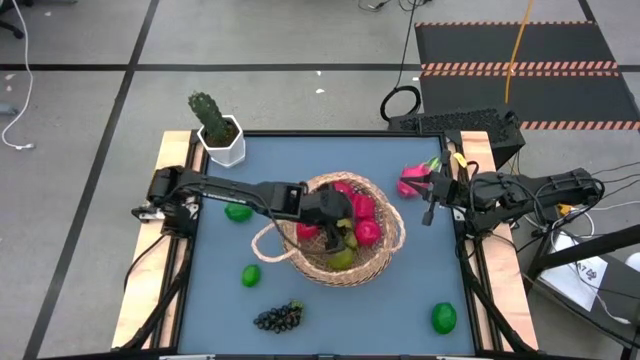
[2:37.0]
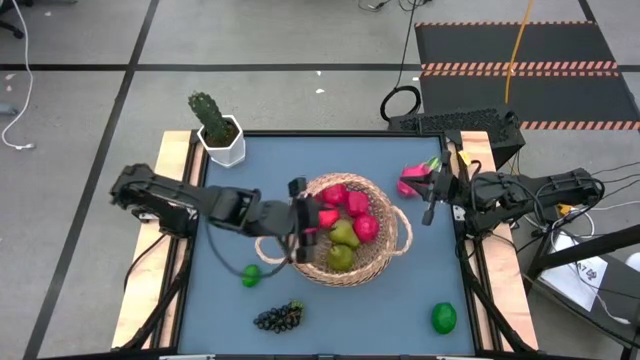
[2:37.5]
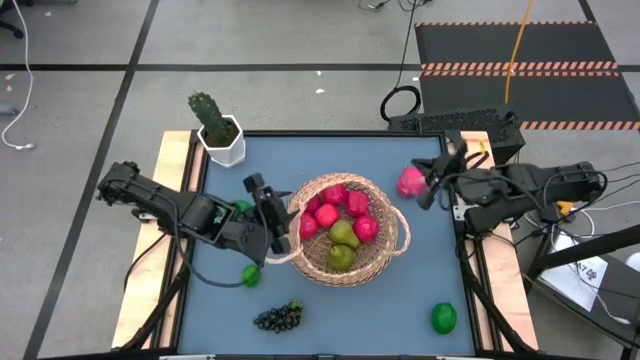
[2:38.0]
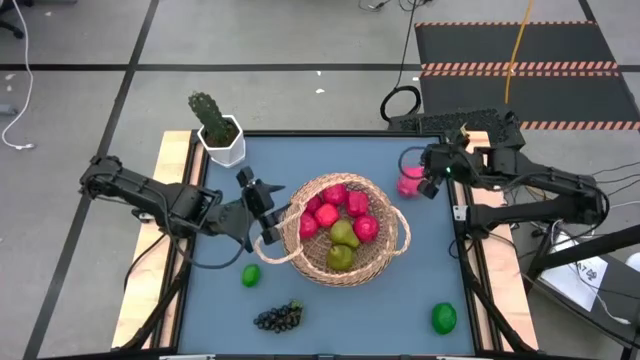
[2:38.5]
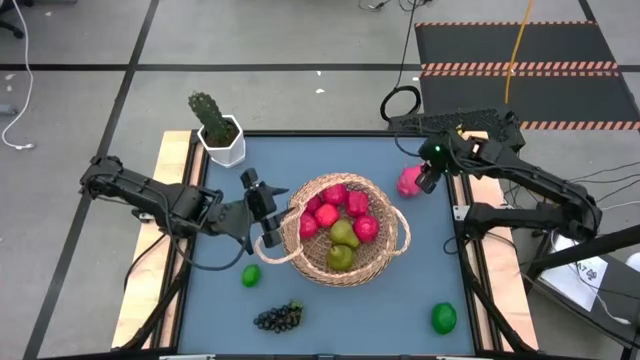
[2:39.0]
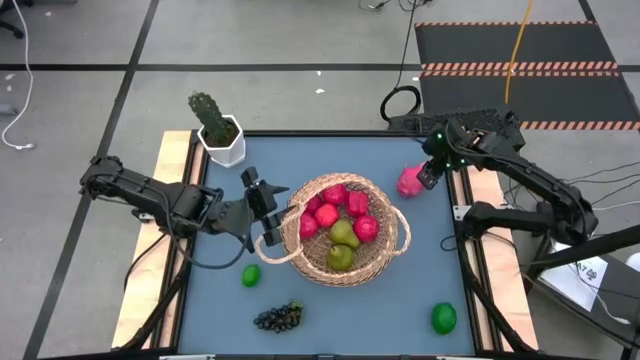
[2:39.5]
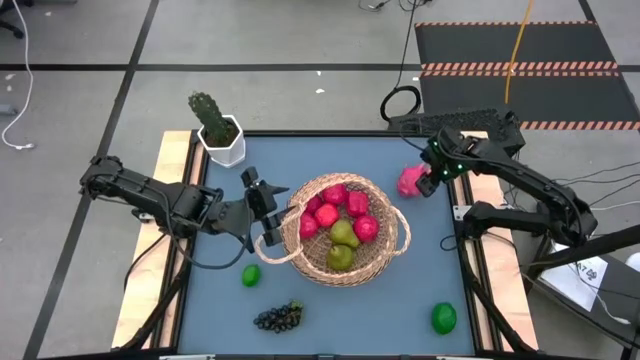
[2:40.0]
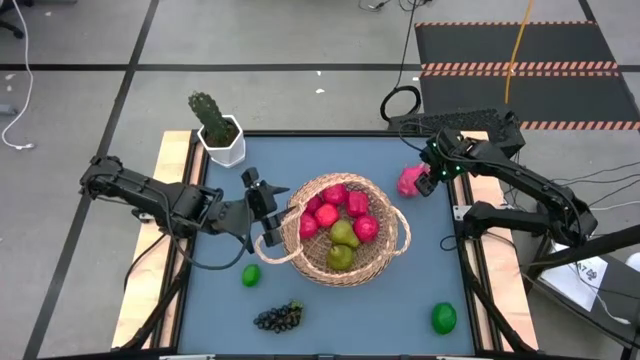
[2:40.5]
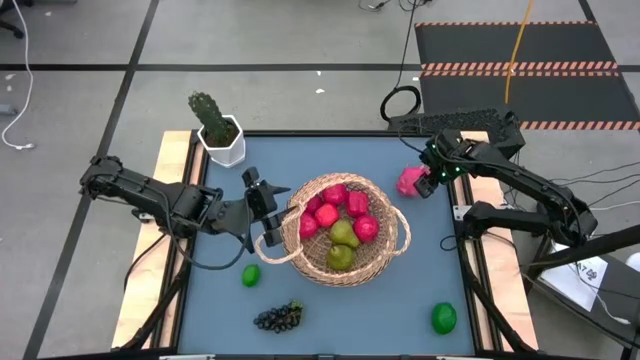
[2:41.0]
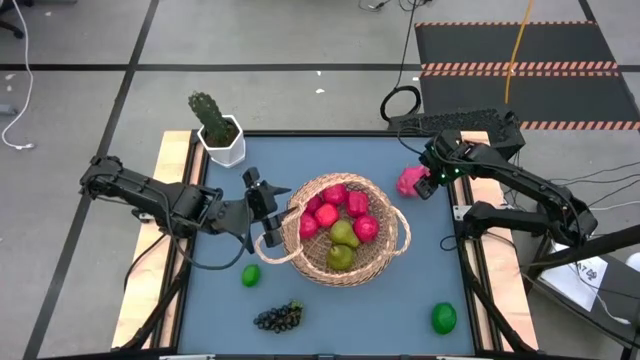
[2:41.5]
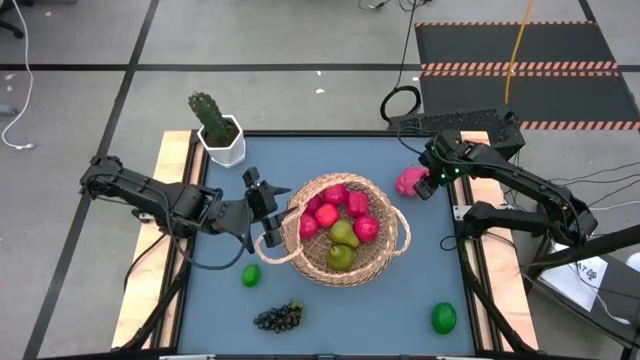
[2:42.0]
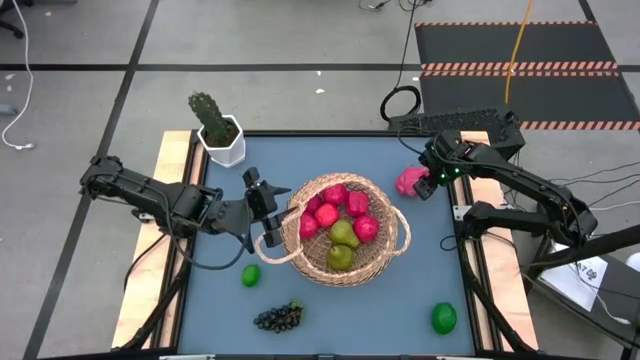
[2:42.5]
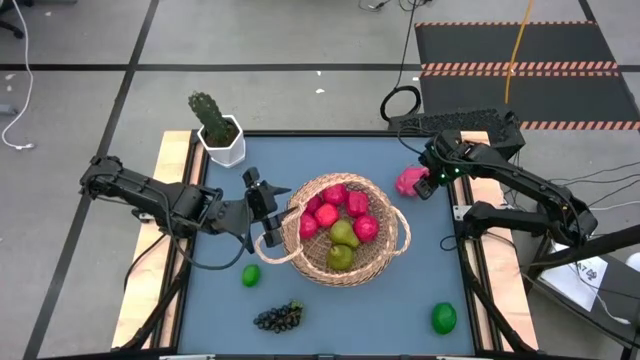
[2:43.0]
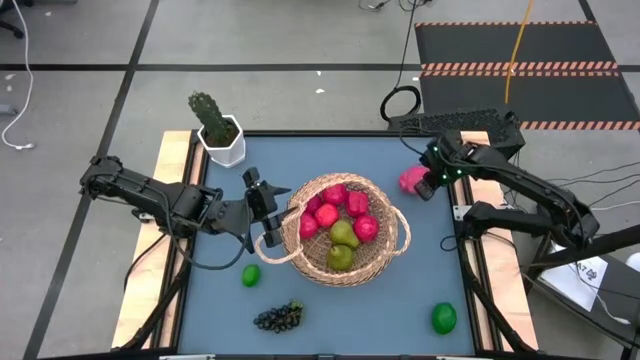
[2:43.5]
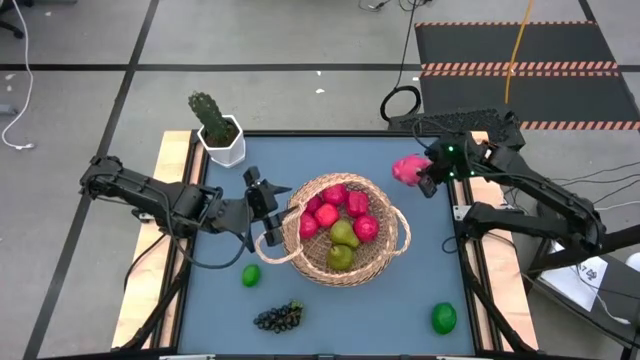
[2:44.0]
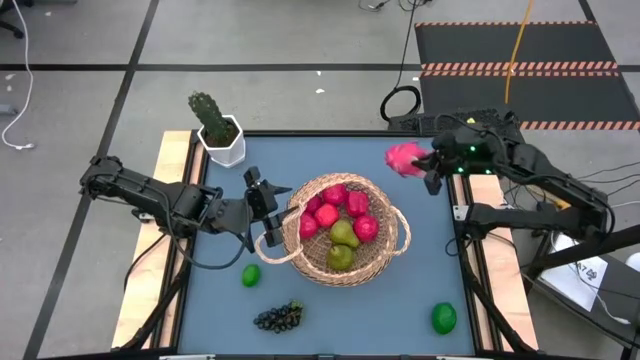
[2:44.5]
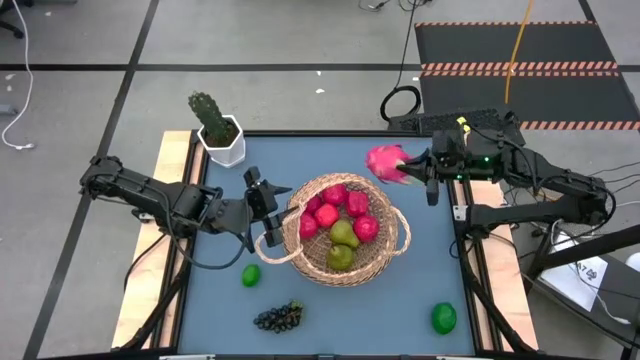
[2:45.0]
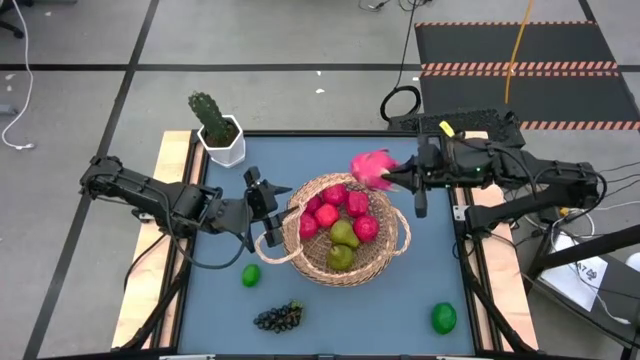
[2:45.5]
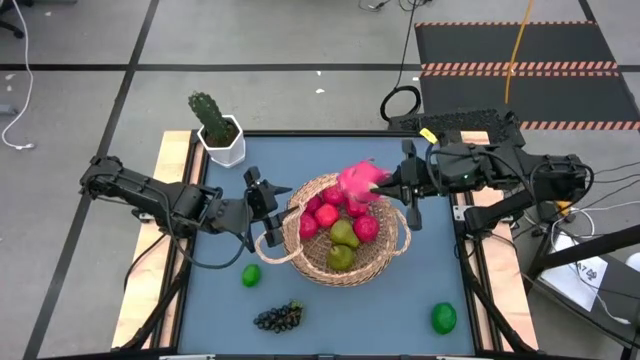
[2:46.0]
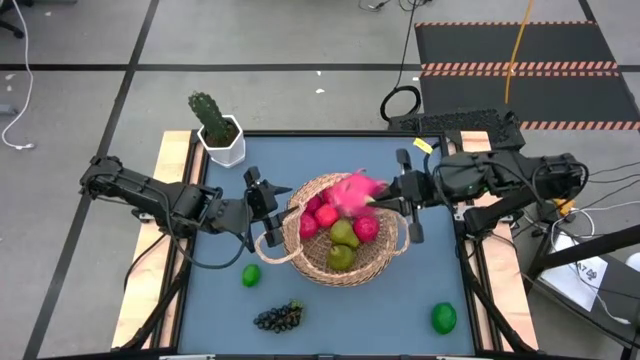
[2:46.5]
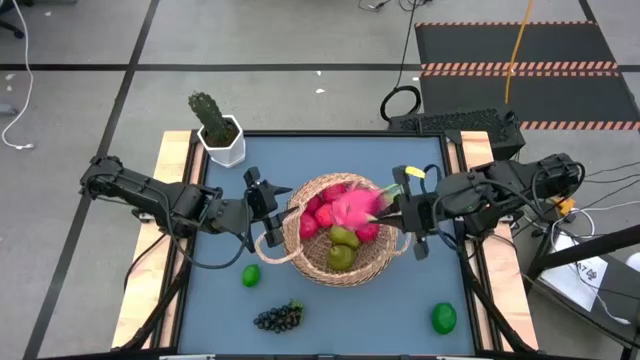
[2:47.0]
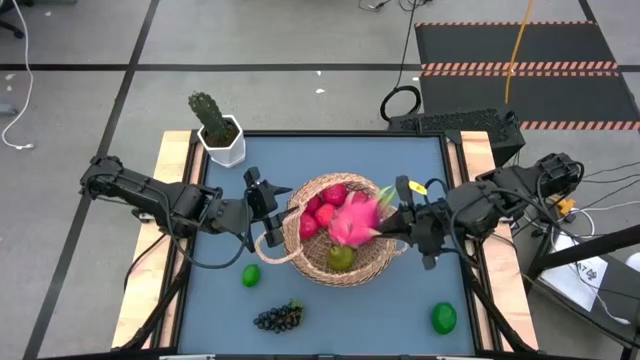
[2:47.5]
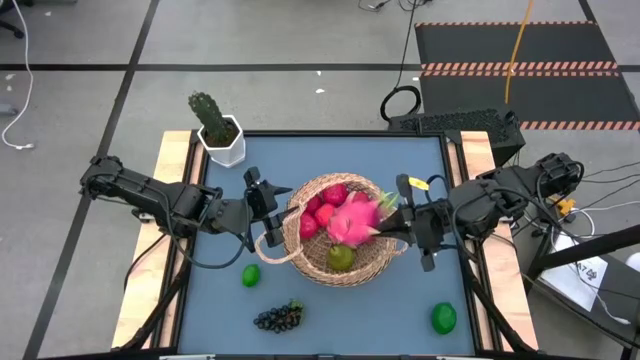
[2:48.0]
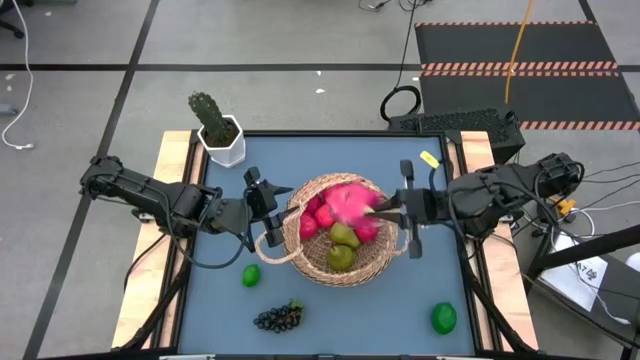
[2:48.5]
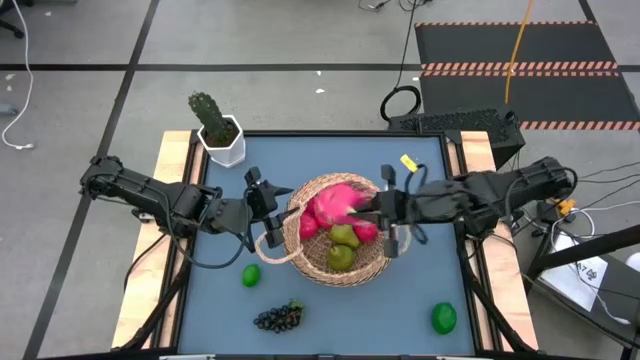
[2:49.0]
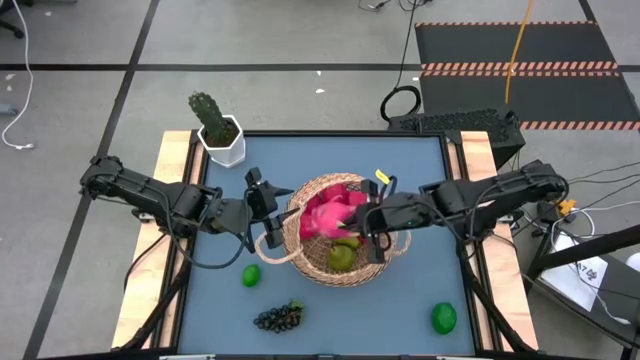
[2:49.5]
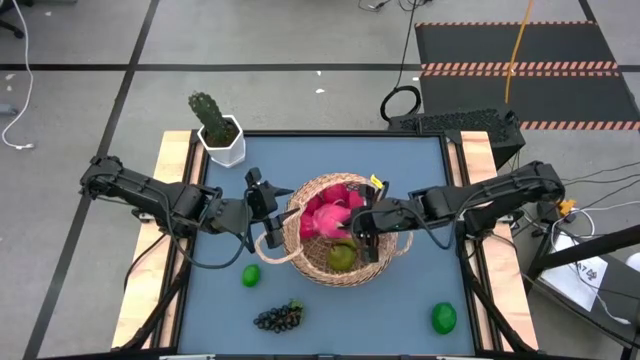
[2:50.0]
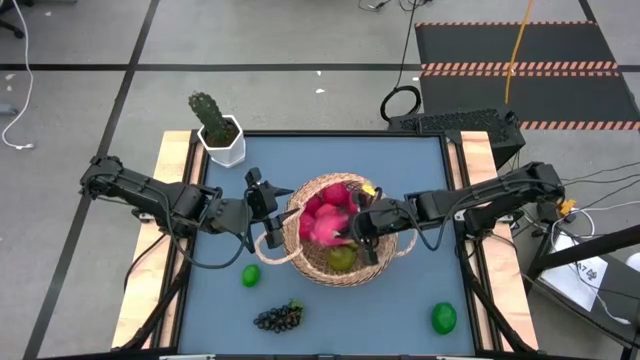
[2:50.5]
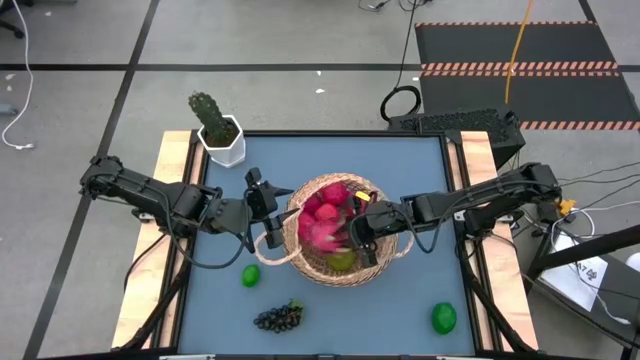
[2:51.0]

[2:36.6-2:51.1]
Task: Build produce basket
Put the pink dragon fruit into the brown basket

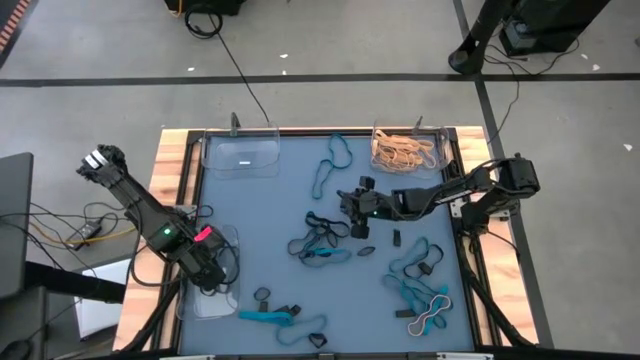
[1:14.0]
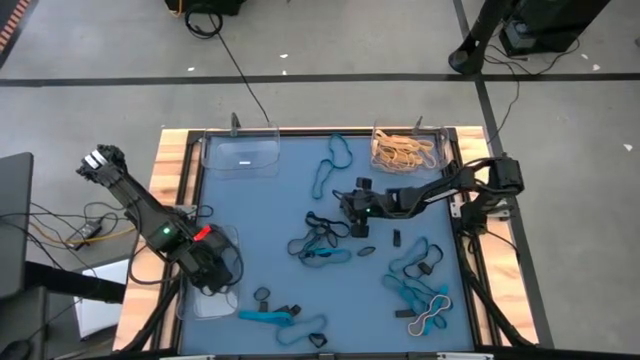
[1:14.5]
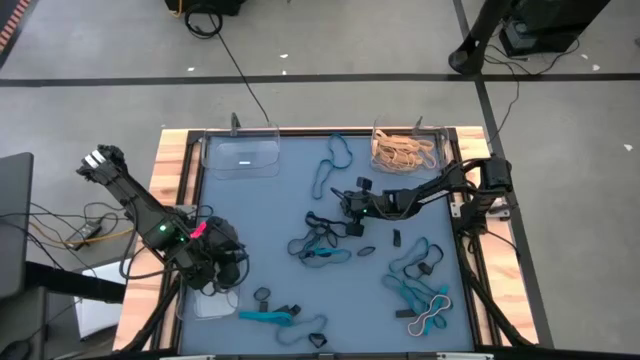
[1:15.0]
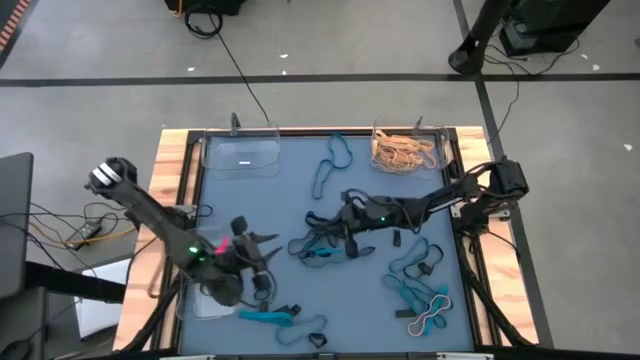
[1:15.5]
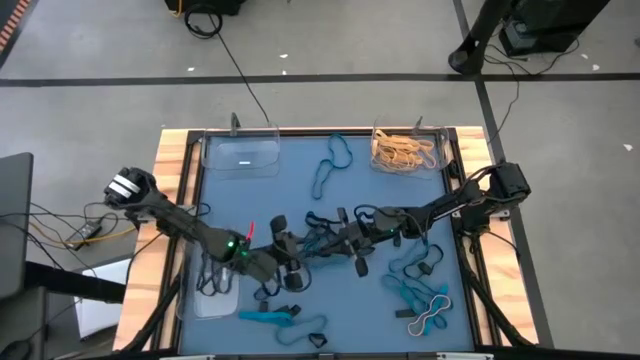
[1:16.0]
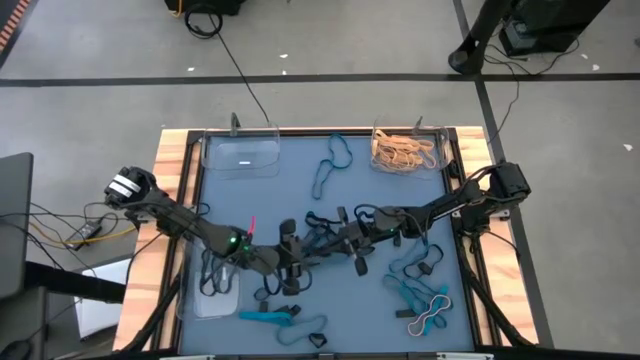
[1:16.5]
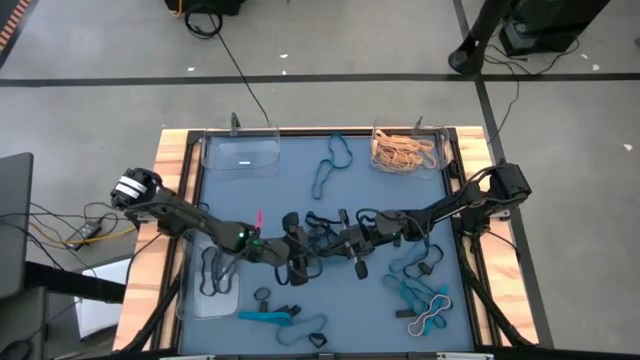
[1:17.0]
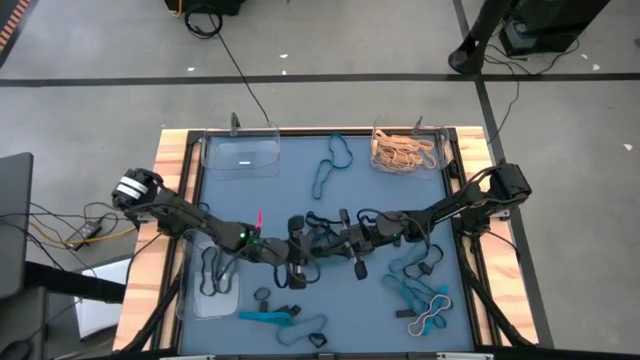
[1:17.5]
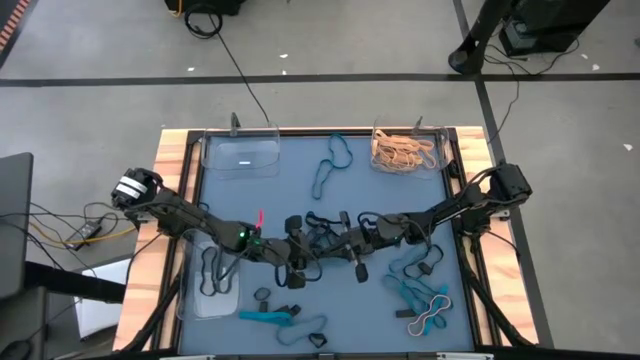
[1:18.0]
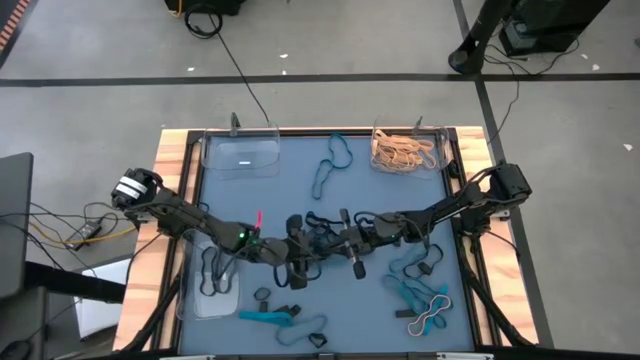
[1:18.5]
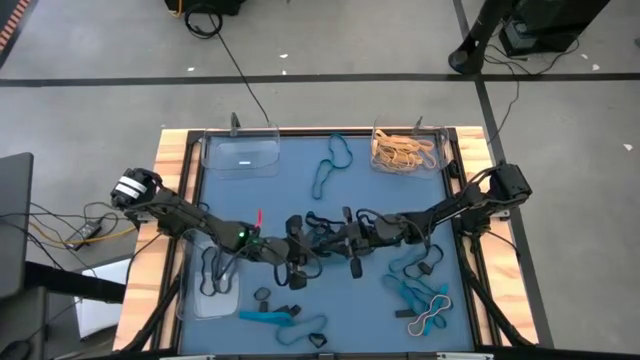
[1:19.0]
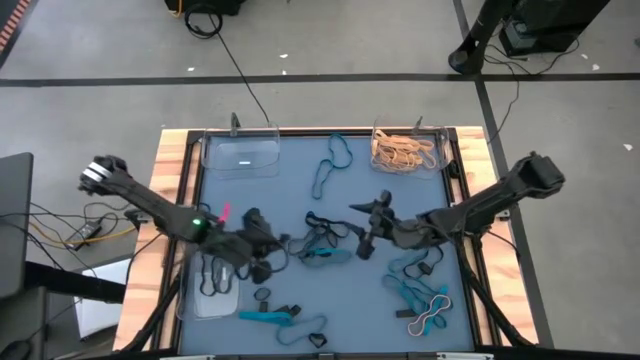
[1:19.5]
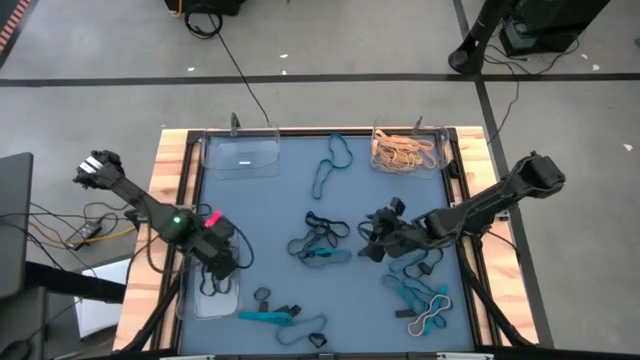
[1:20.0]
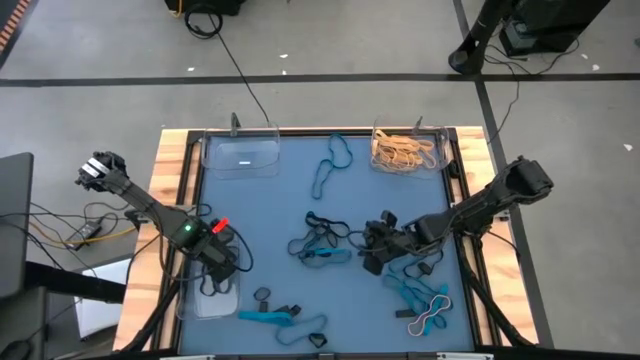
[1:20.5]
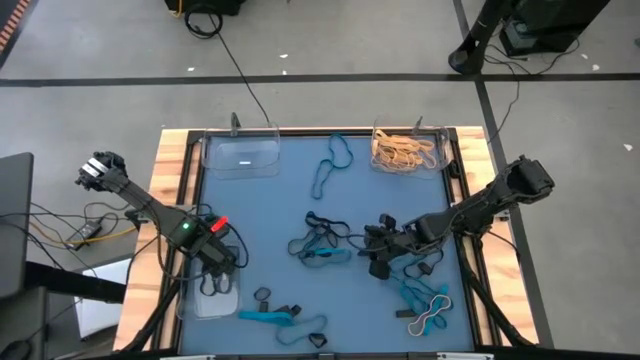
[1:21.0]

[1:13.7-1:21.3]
Task: Sort rubber bands into baskets
Put the small black rubber band into the bottom left transparent bin
